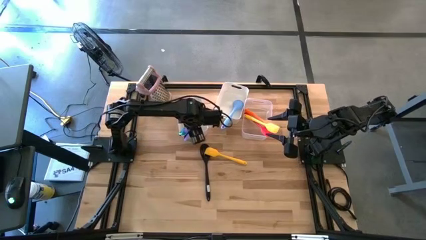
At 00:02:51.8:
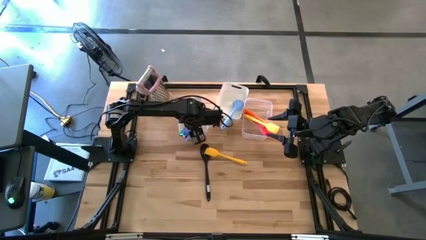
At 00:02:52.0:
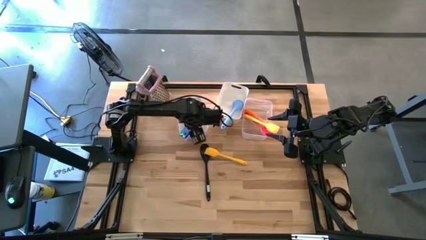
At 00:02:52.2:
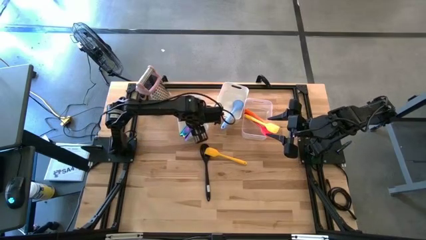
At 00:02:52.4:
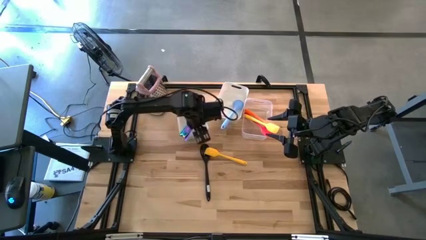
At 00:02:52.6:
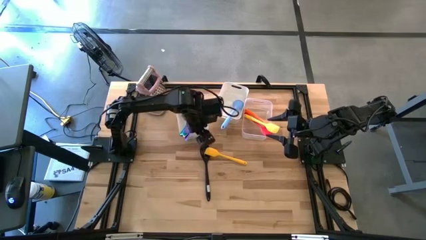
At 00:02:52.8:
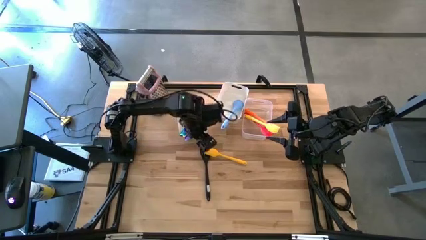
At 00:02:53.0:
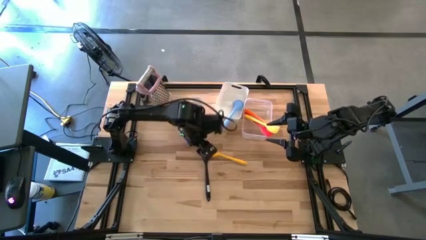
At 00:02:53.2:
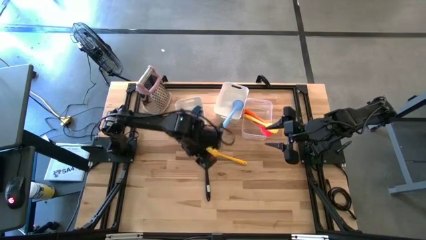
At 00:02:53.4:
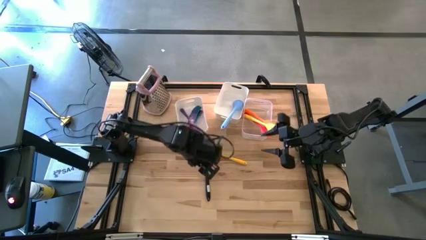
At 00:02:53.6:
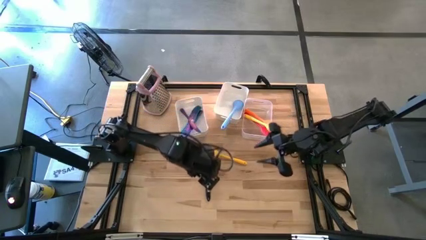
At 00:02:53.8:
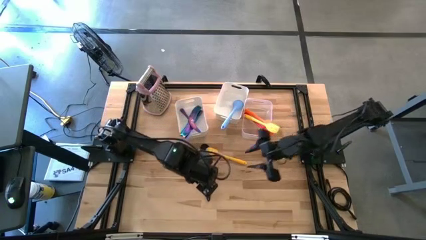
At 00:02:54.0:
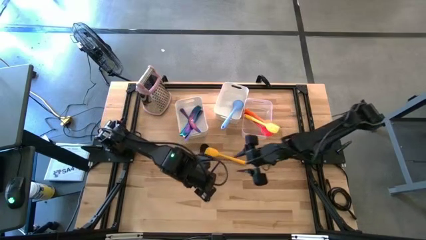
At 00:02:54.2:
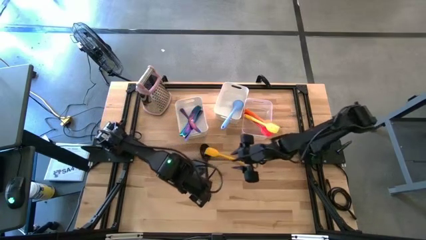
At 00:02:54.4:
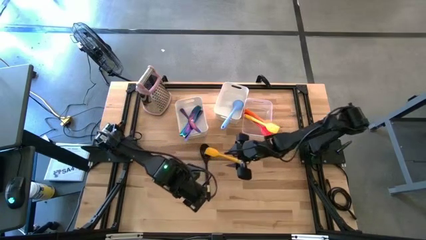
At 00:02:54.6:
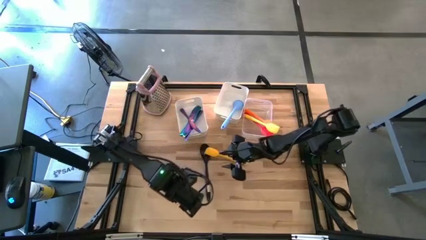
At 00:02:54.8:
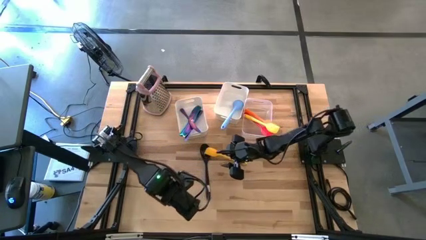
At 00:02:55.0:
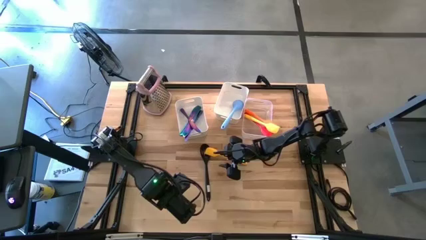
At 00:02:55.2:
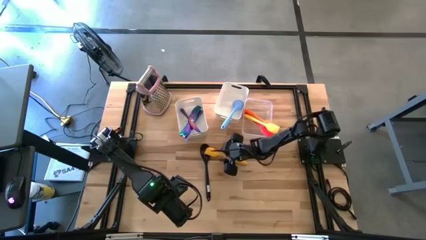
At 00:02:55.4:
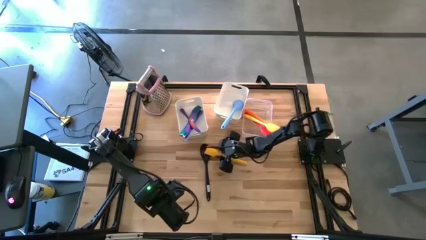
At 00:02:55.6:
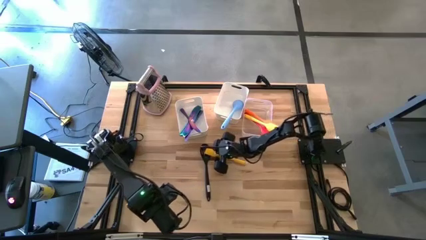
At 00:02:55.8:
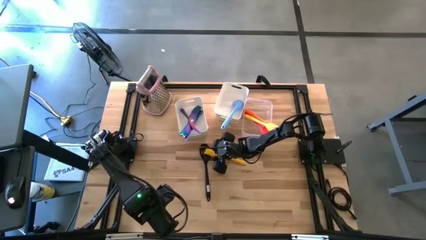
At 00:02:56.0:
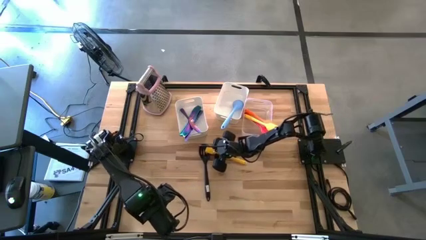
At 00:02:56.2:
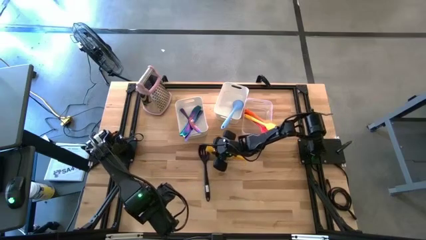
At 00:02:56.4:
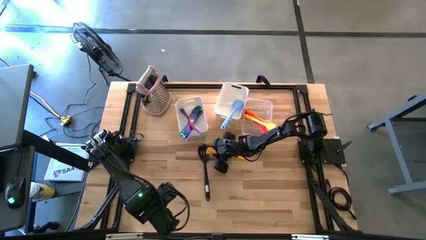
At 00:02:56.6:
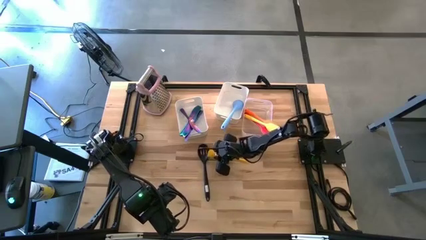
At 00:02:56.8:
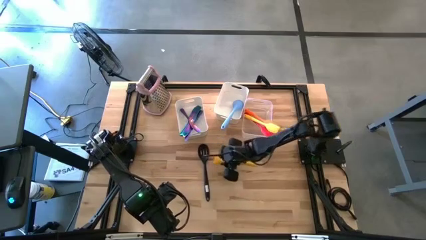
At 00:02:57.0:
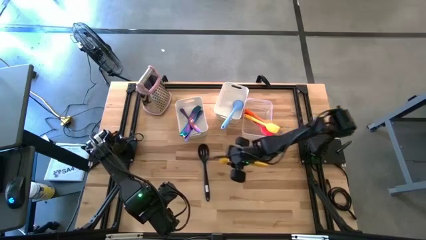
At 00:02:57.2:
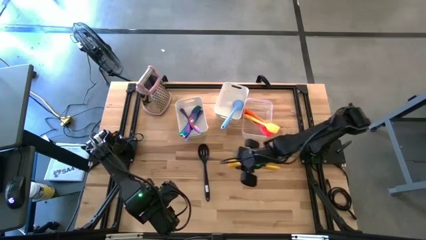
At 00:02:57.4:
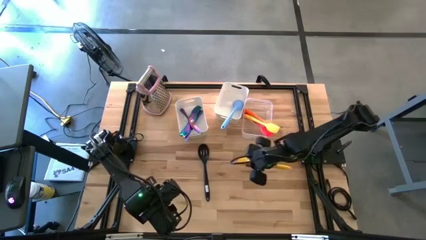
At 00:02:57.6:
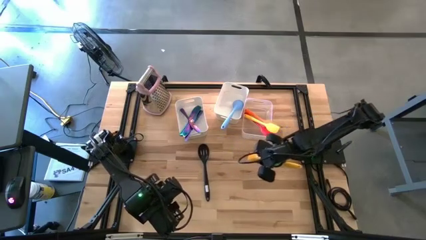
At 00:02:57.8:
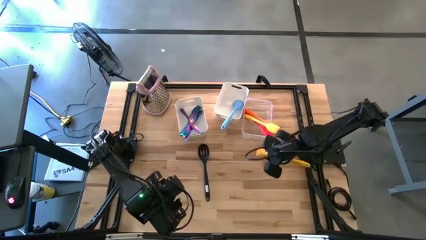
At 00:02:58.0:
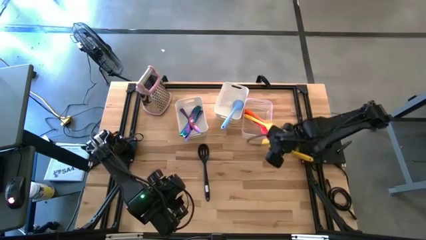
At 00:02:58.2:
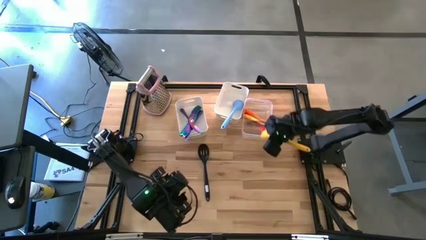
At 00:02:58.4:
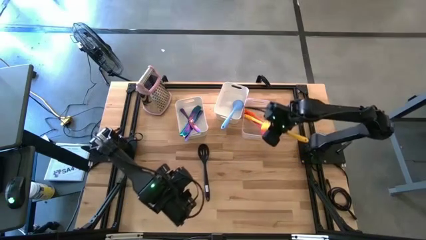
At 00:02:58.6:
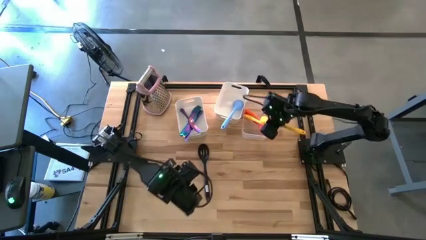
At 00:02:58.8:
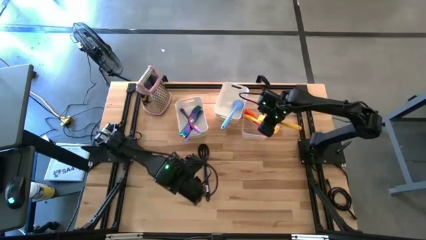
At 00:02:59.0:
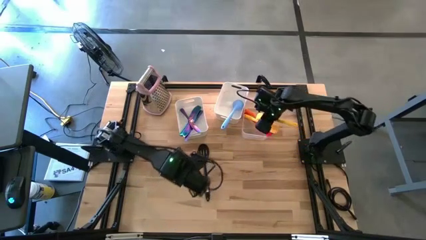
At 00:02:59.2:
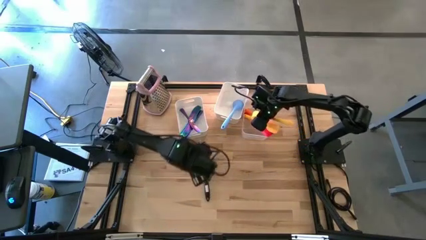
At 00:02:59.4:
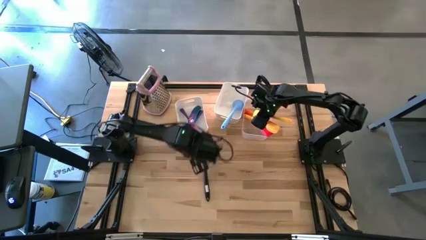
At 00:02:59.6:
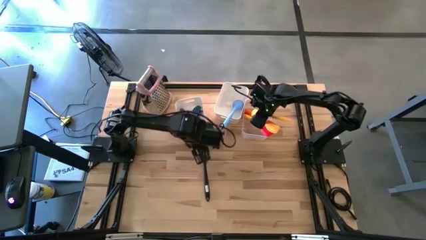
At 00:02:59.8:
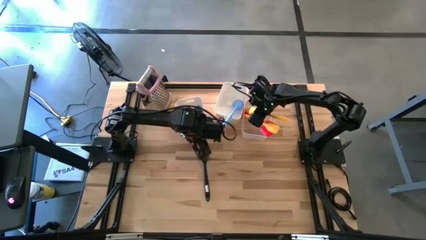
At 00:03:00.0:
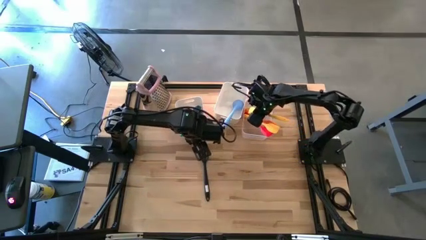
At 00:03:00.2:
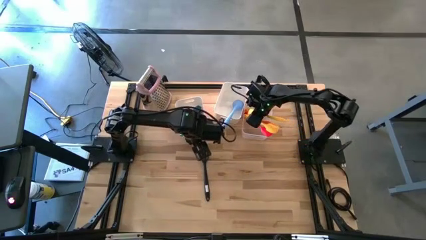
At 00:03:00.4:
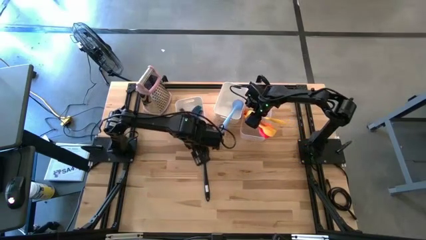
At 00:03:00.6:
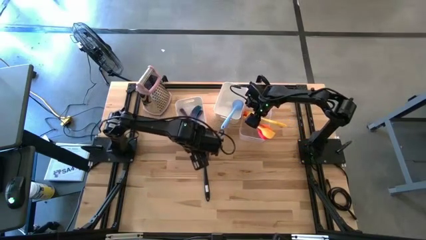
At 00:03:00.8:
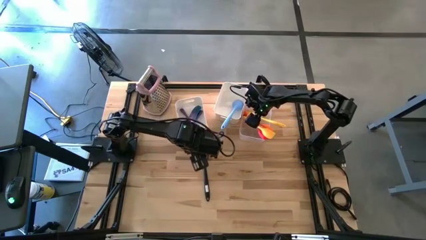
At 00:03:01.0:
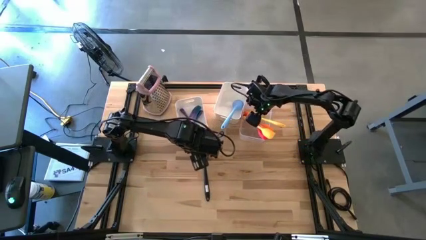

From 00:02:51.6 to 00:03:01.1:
Task: Pick & Place Kitchen Items
Put the yellow spatula into the transparent bin

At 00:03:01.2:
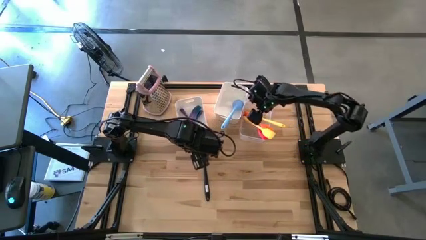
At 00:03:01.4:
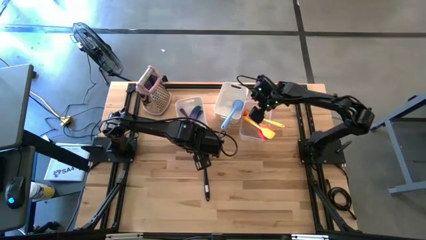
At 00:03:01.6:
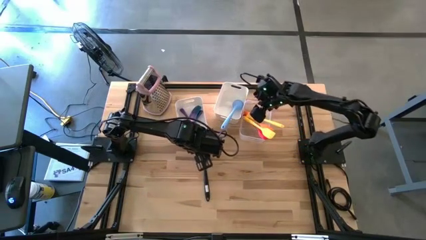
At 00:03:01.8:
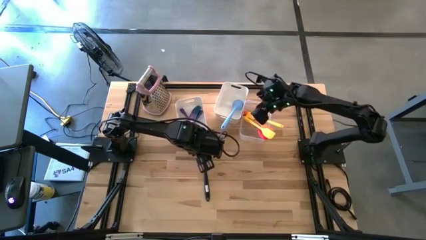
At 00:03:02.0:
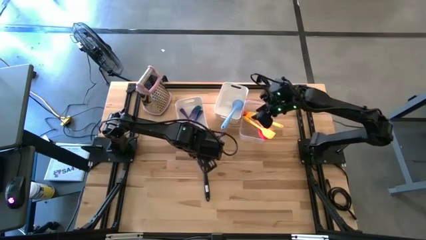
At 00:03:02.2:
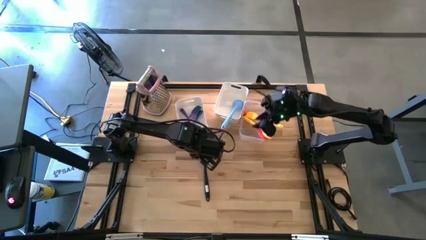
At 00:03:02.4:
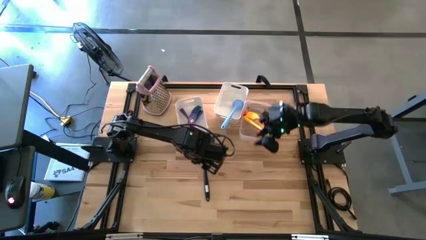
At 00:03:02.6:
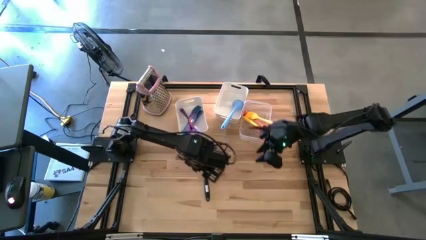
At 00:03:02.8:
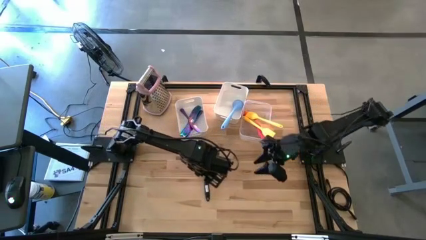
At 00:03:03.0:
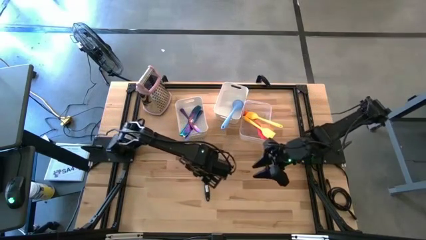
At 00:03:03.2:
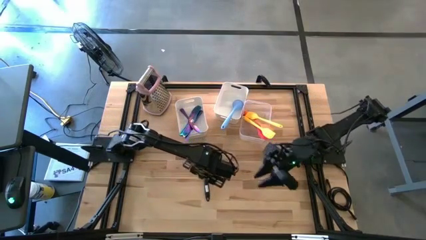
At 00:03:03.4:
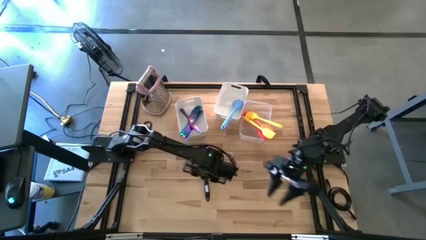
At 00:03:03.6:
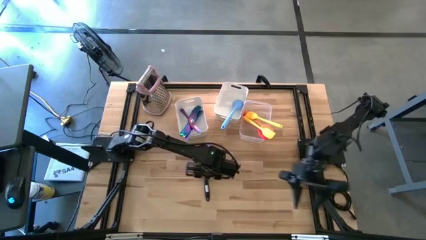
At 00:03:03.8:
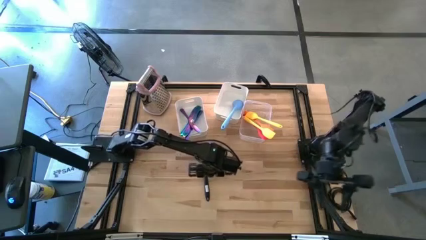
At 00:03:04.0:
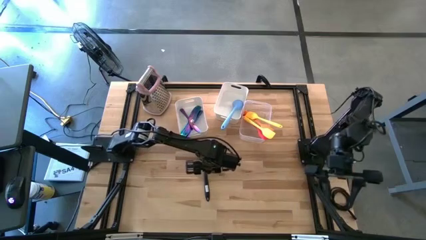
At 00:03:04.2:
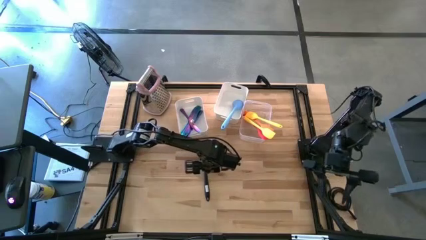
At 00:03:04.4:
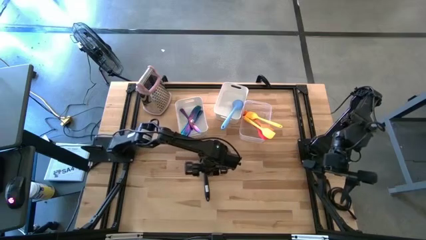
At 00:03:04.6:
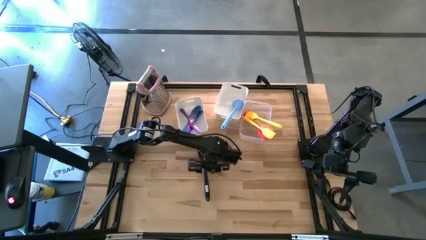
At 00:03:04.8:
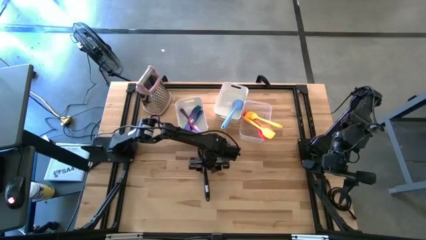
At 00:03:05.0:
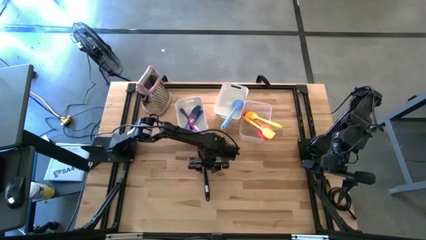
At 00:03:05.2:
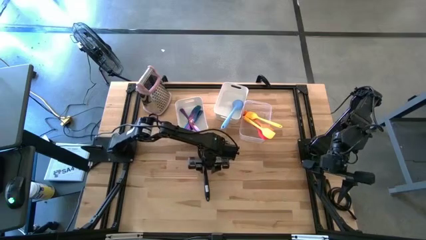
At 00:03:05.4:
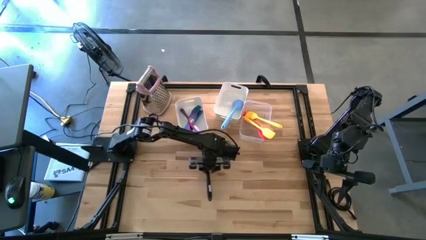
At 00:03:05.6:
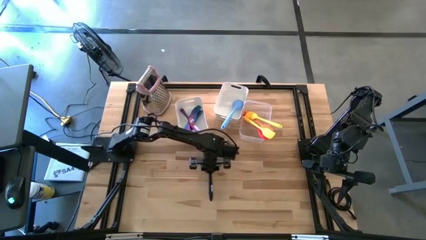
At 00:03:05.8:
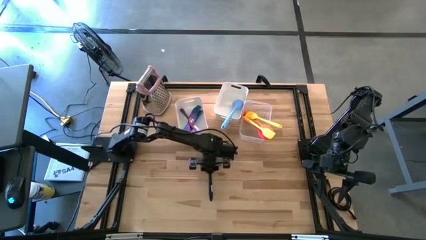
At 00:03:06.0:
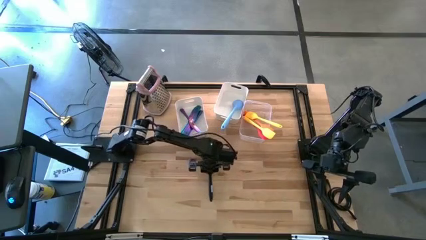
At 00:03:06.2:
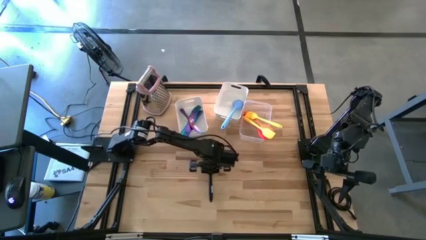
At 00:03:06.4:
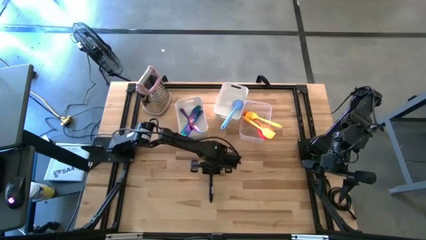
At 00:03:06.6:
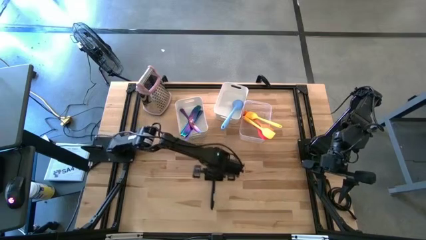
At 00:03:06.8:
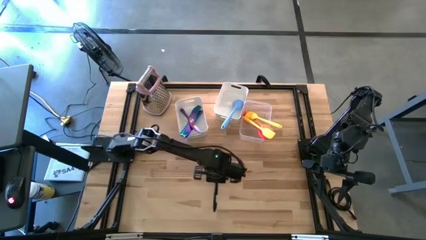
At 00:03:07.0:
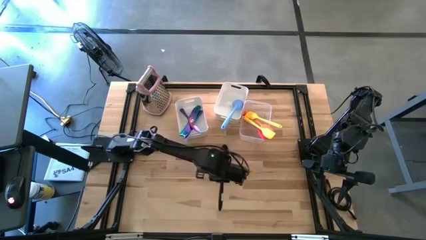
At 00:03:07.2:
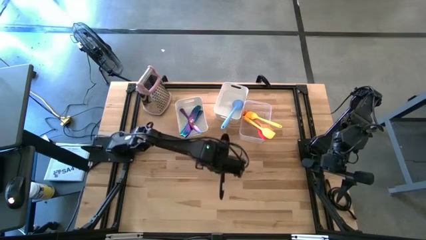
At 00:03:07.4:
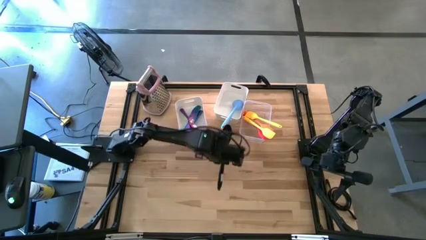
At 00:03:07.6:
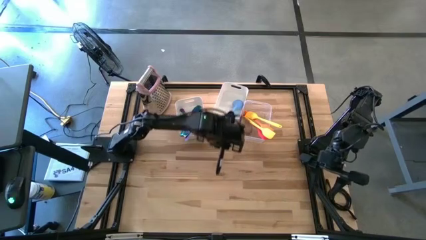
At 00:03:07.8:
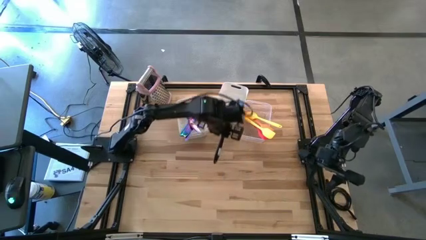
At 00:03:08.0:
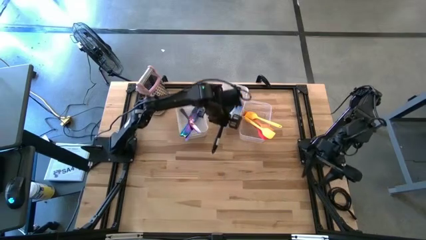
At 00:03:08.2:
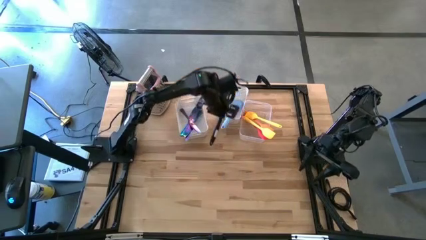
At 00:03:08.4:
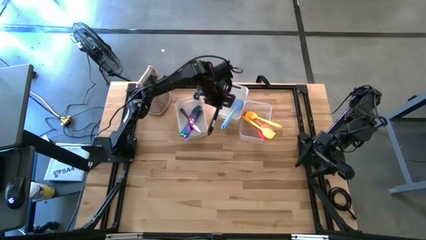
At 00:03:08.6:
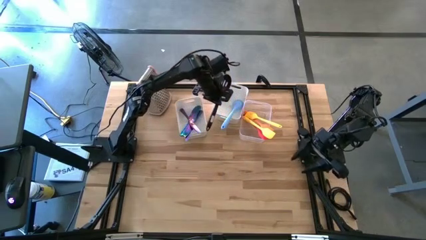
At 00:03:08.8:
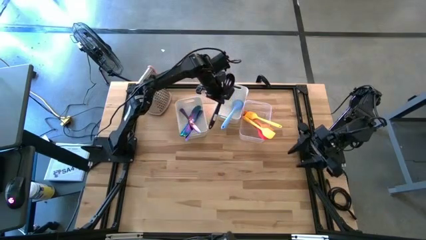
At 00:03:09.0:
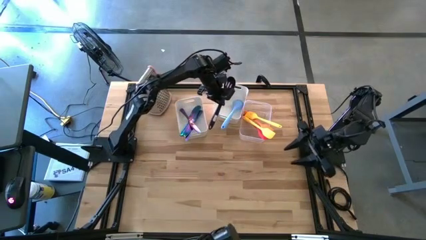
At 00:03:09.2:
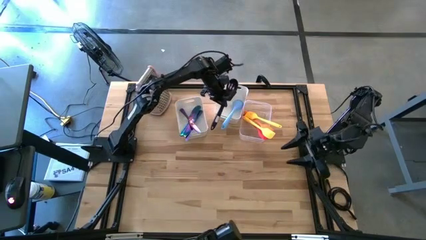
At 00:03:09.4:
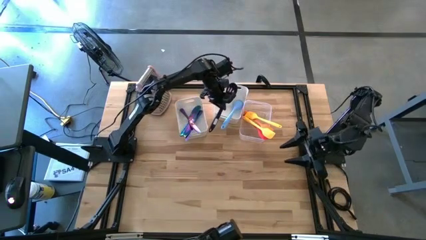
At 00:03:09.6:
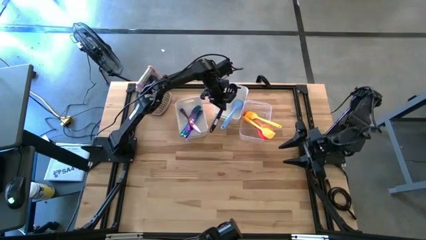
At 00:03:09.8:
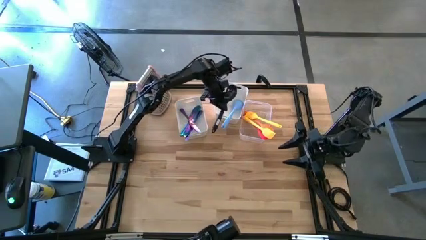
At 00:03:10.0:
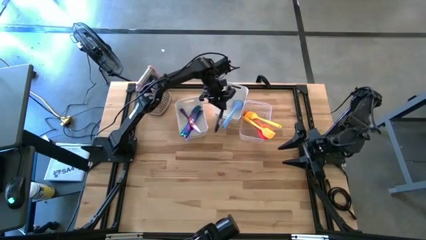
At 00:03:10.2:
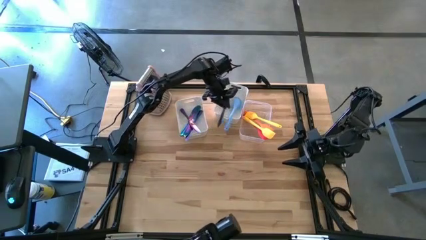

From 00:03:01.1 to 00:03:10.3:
Put the black serving spoon into the left white bin
